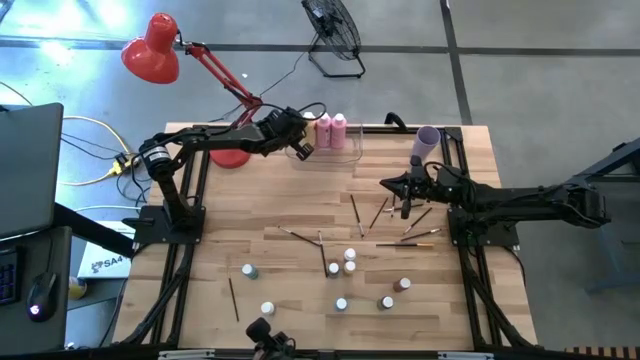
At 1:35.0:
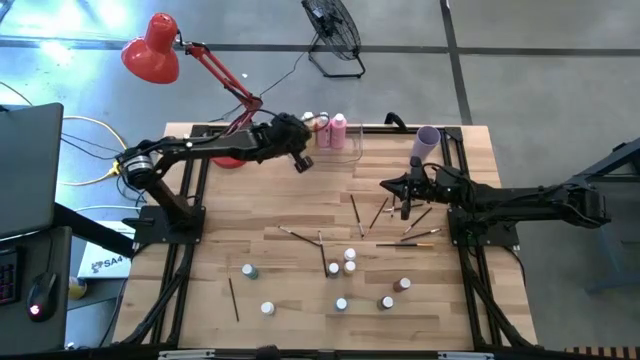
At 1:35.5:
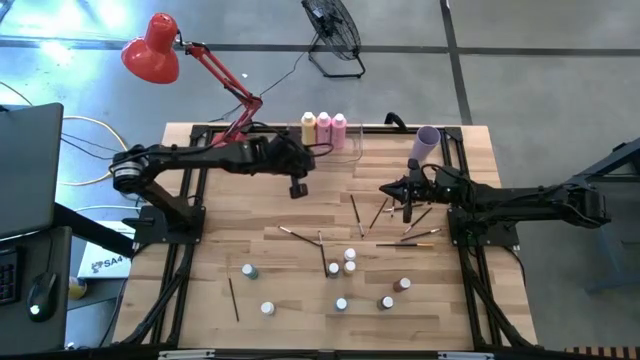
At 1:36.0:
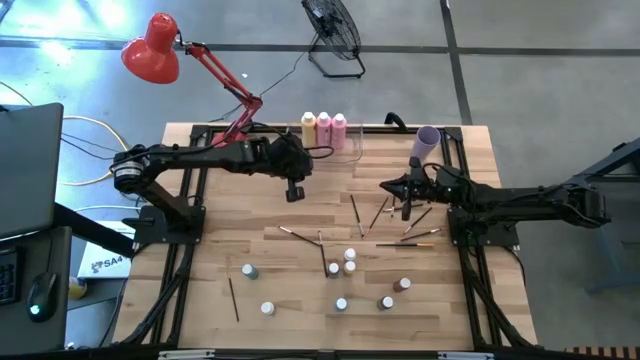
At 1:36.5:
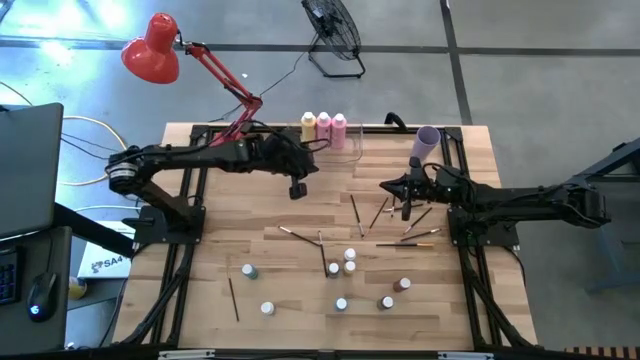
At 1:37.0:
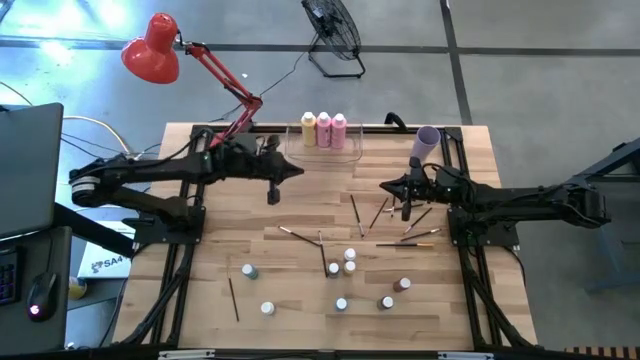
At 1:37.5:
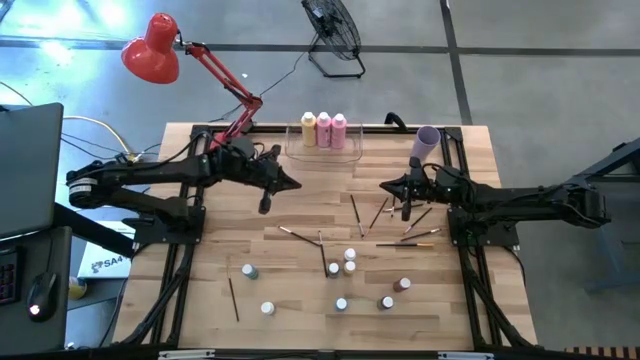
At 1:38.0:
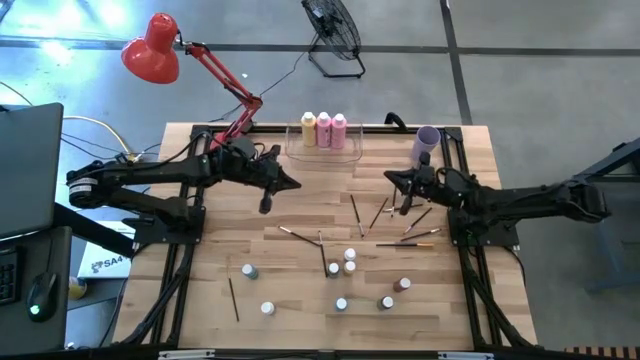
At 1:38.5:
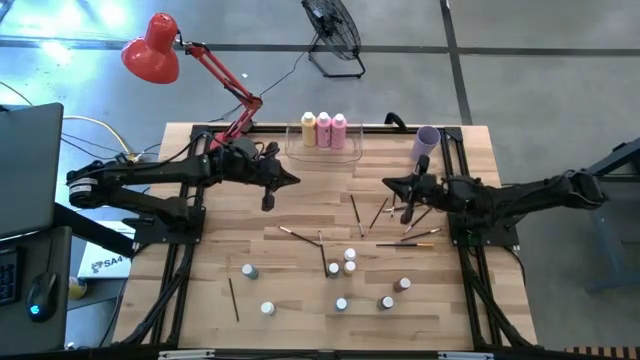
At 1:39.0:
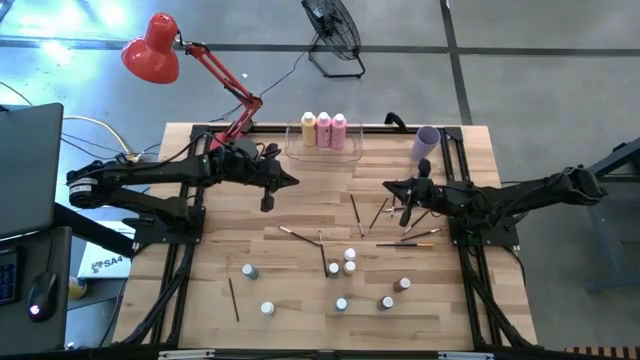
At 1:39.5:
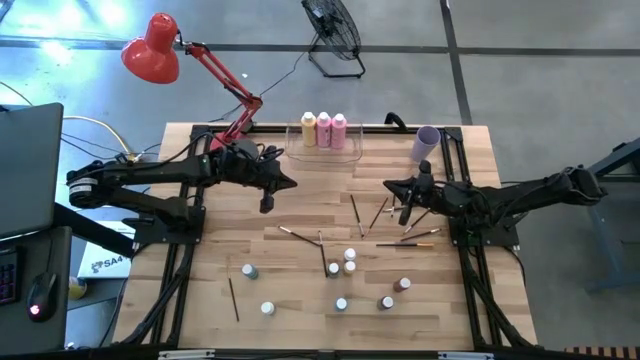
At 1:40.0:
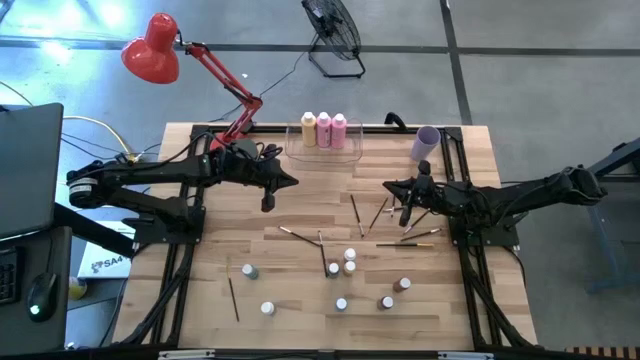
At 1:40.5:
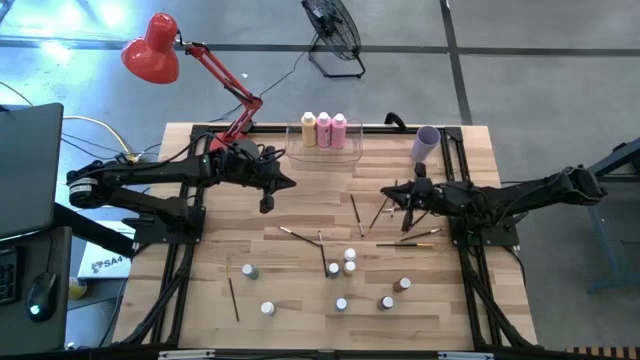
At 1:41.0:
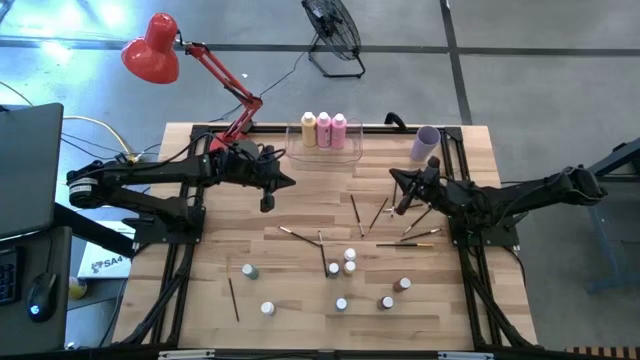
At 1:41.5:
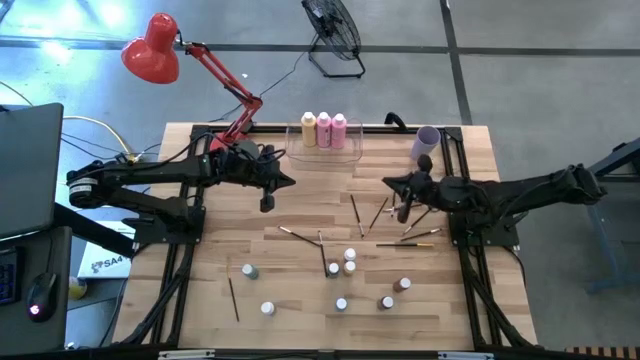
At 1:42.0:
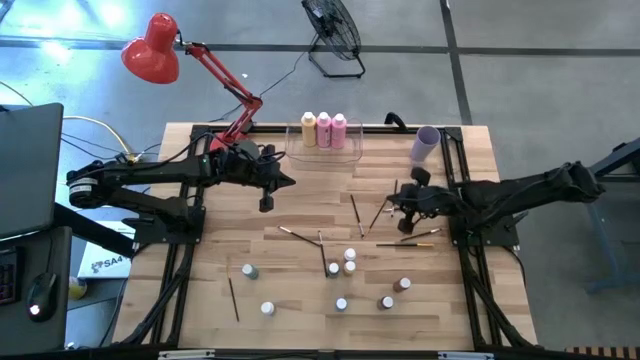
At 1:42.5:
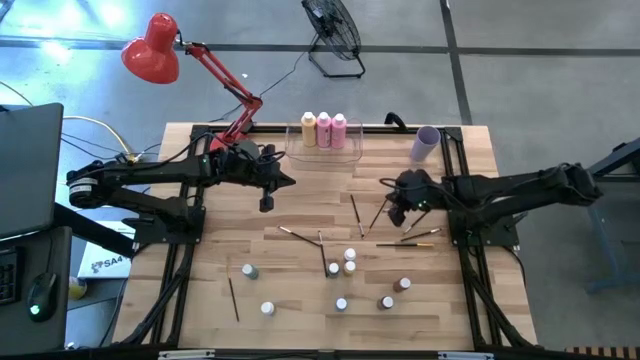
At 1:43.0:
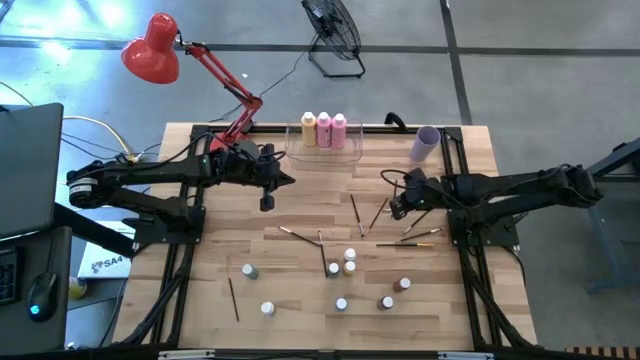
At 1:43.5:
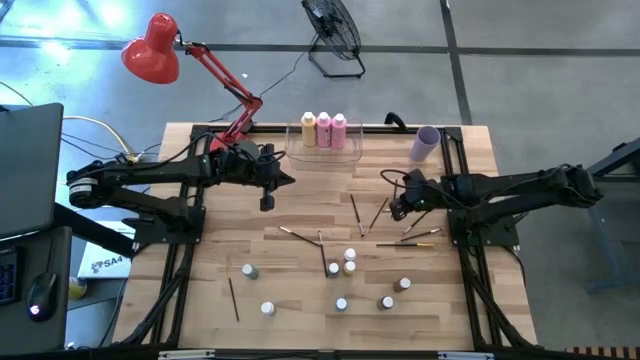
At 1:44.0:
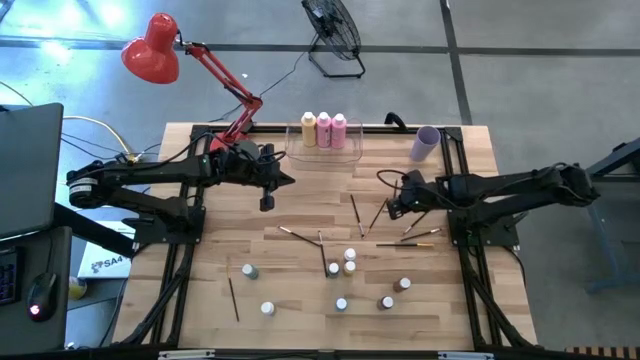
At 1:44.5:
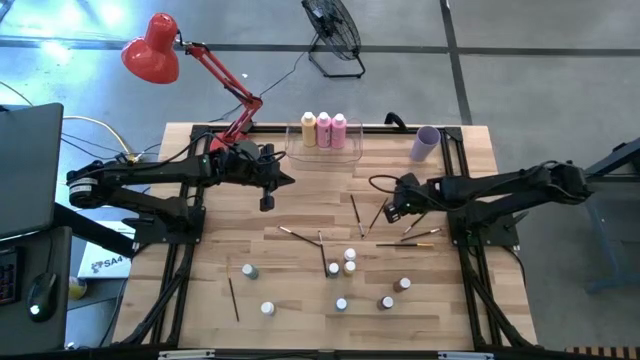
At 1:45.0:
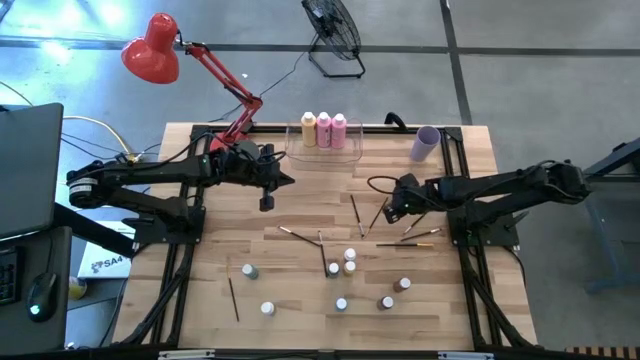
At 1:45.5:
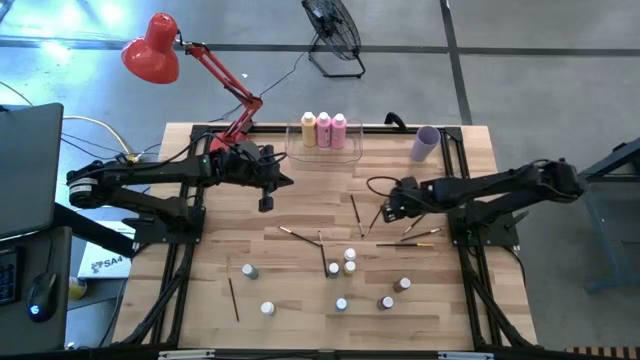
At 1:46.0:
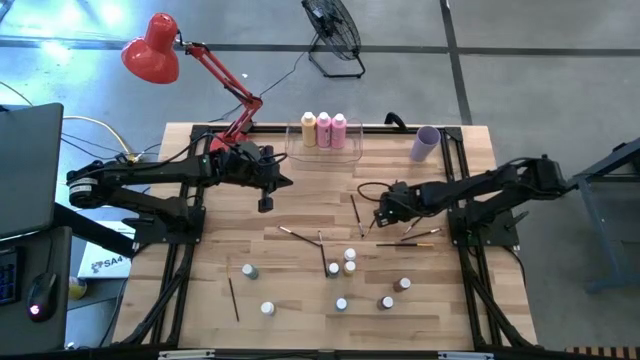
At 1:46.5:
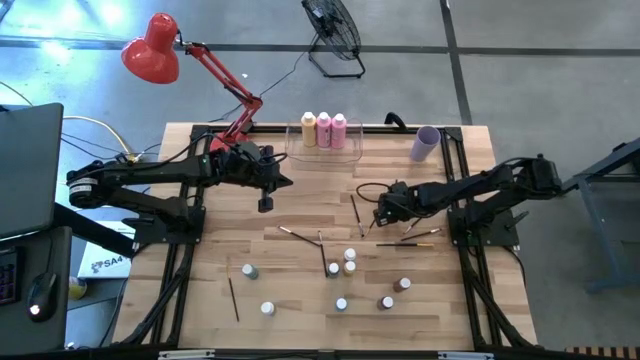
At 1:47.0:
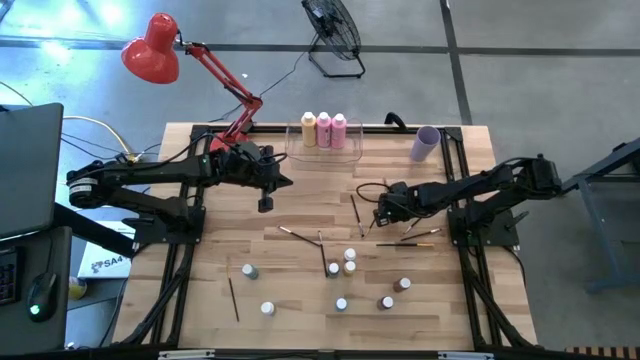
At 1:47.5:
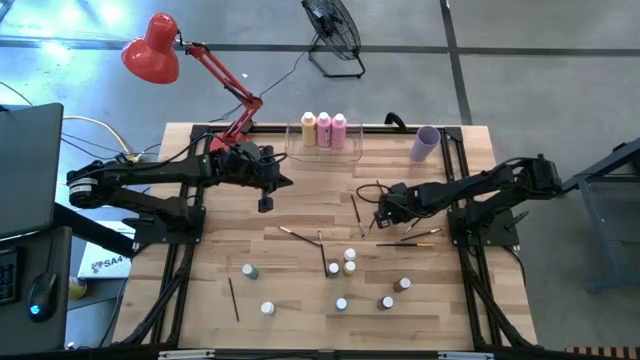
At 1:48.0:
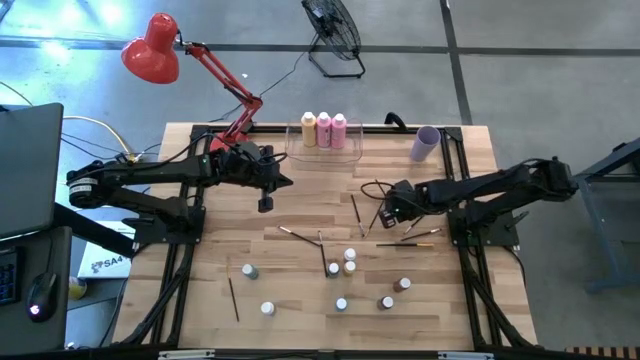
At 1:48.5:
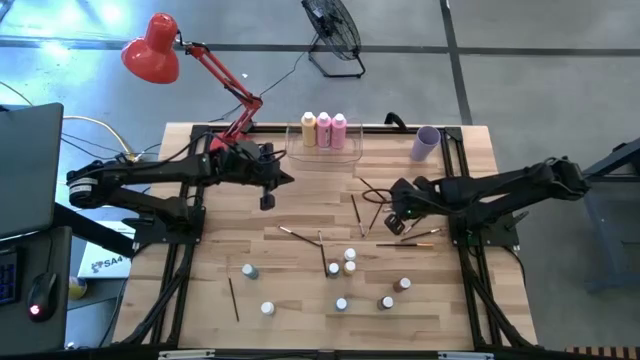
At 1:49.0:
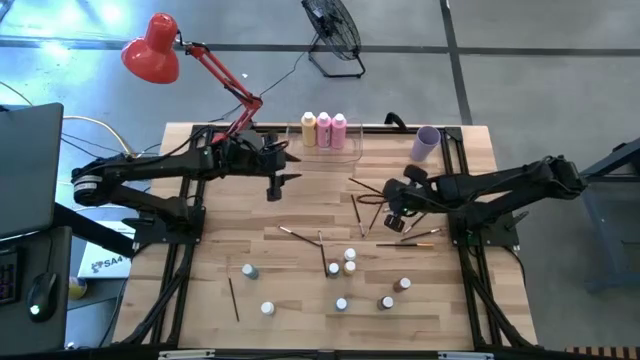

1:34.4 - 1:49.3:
Task: Pick & Place Paint Supplies
Put the black paint brush into the violet cup

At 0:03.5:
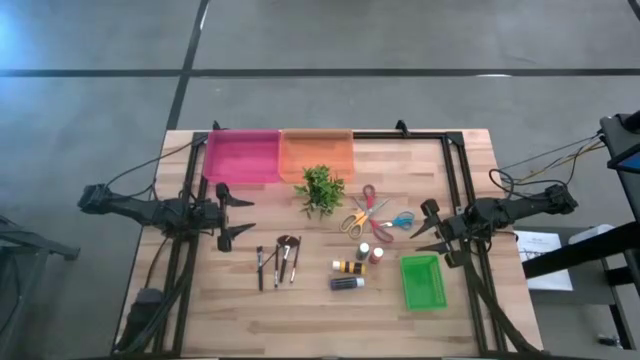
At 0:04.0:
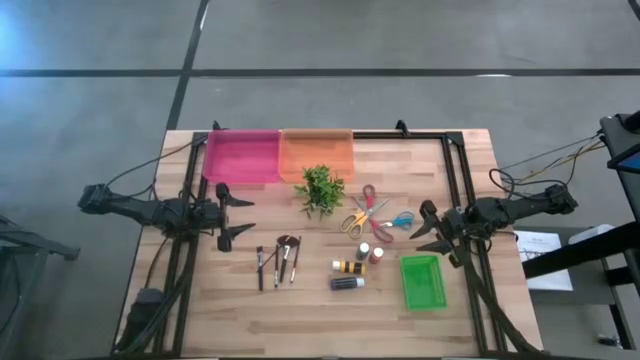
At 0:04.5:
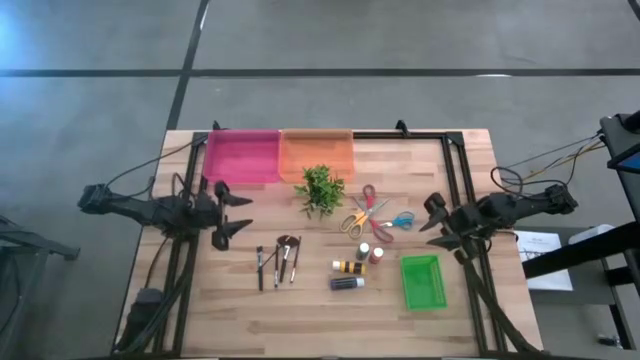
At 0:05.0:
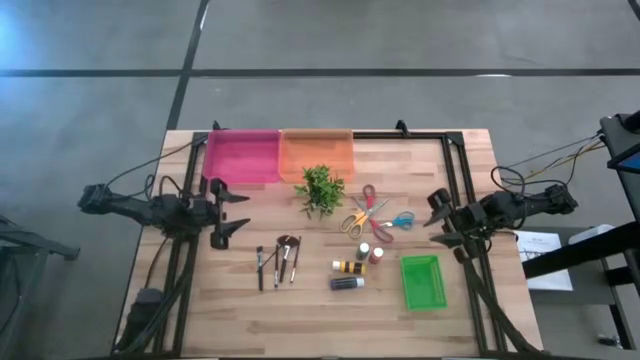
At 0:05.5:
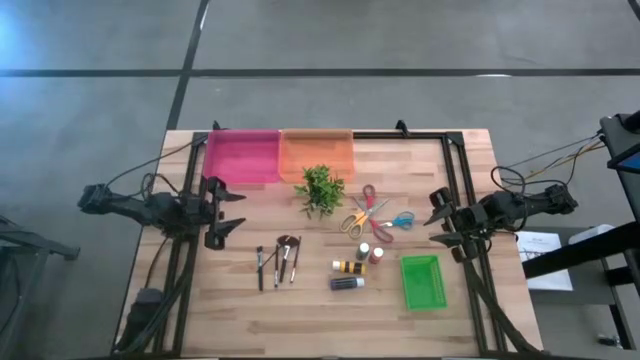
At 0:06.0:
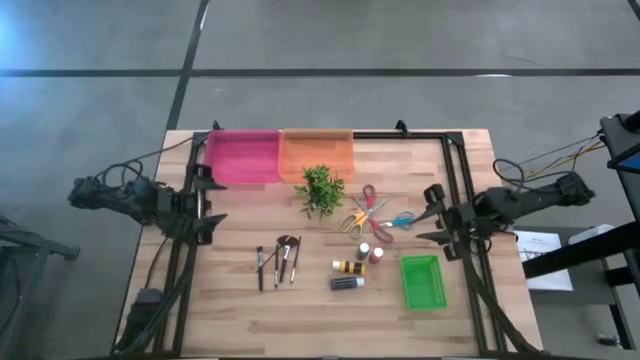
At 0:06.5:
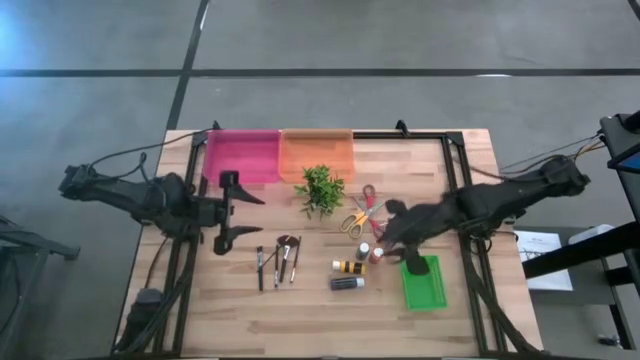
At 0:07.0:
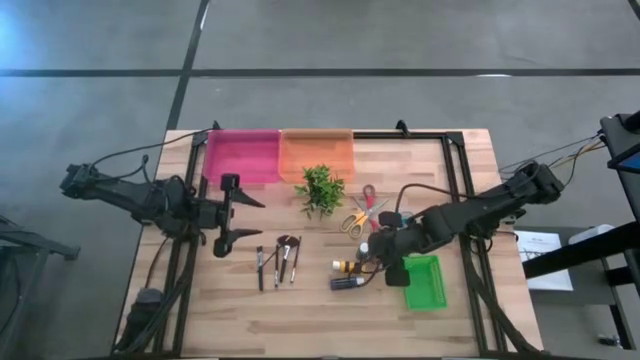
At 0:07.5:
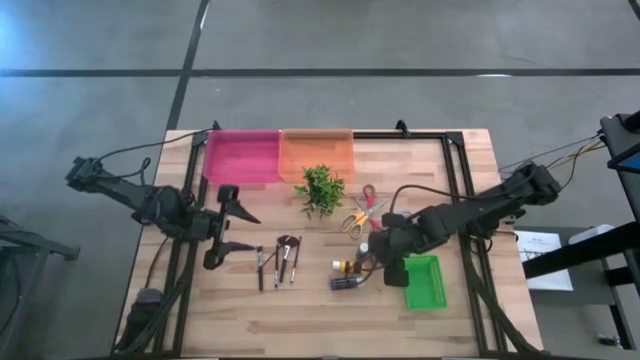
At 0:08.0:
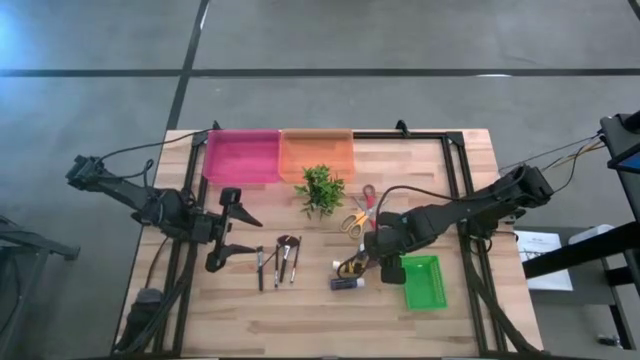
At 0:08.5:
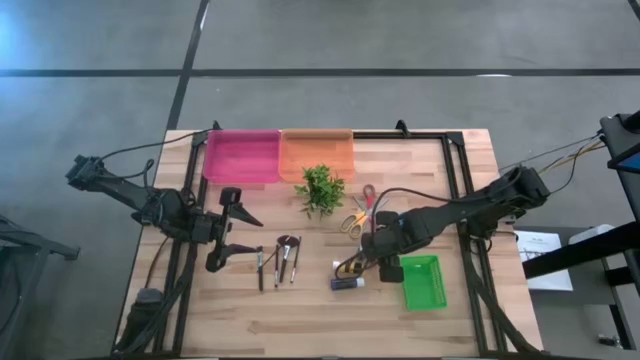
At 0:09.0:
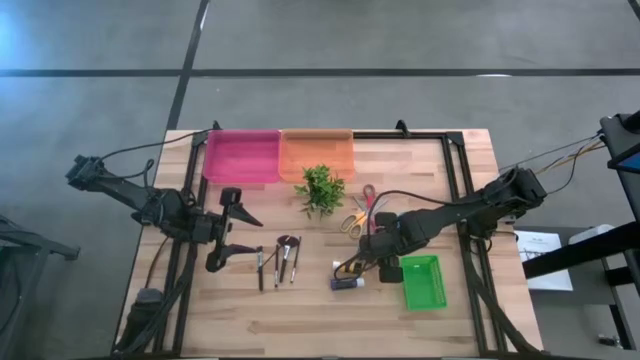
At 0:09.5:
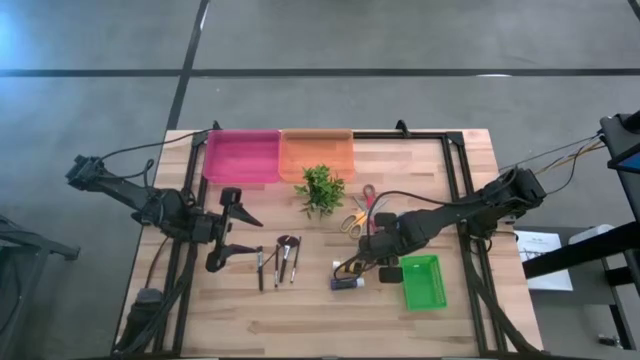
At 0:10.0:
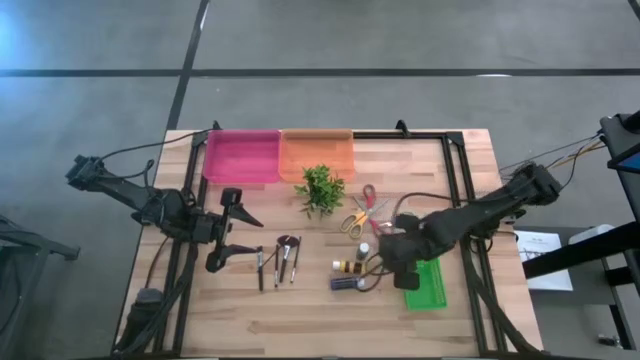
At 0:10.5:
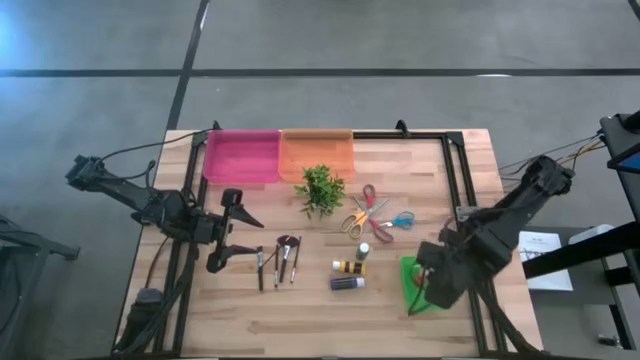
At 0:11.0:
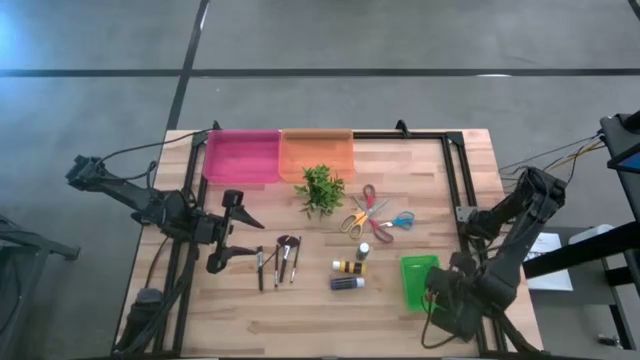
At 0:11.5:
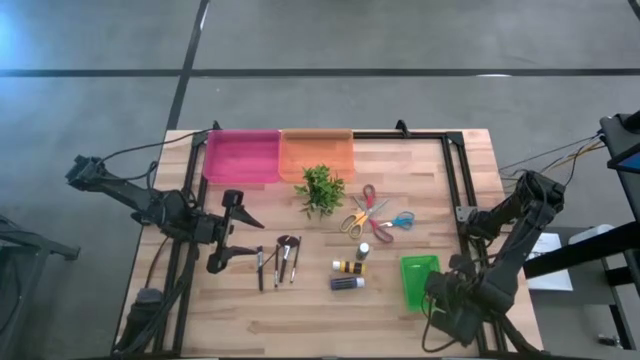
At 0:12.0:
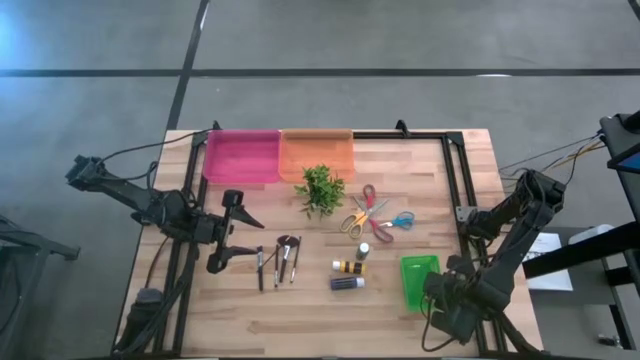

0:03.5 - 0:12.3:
Task: Pick & Place Paint Supplies
Put the orange paint bottle into the green bin
